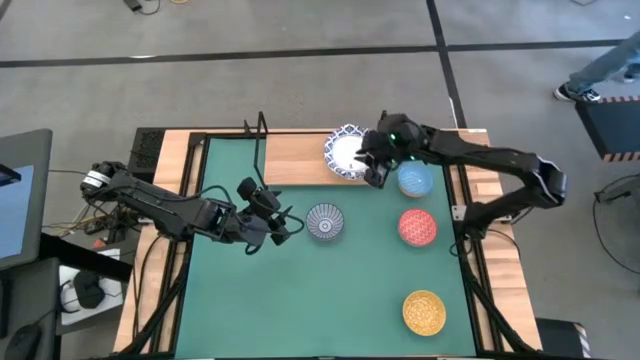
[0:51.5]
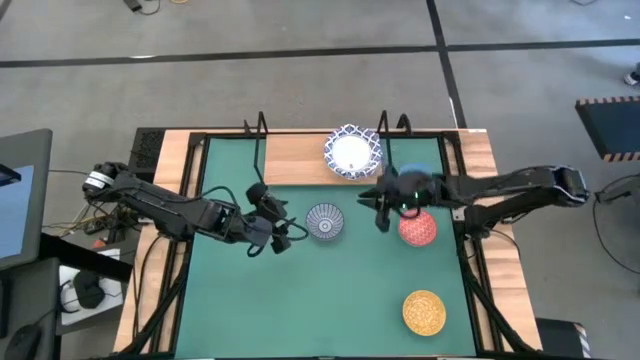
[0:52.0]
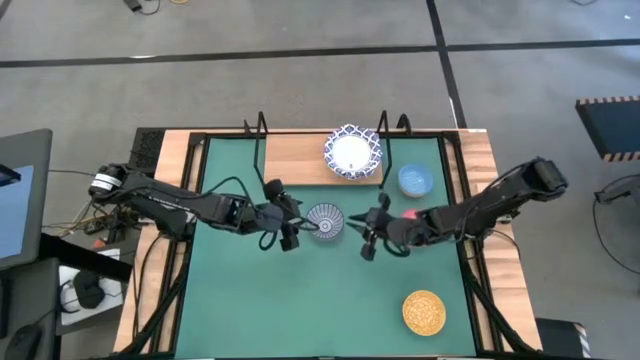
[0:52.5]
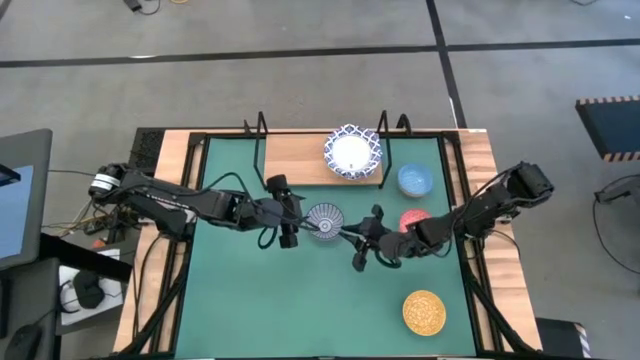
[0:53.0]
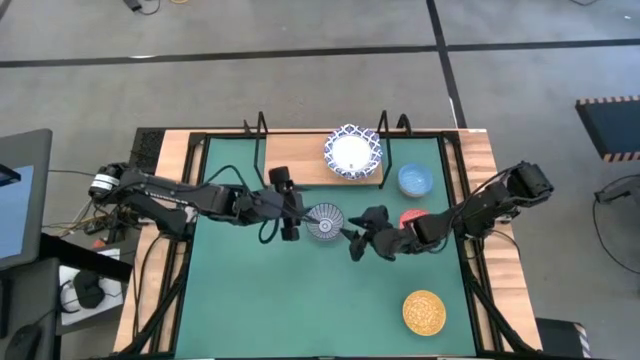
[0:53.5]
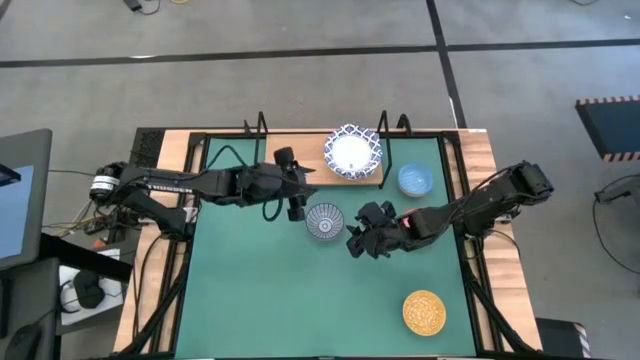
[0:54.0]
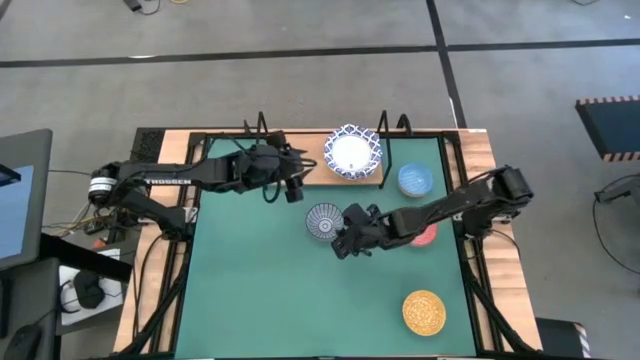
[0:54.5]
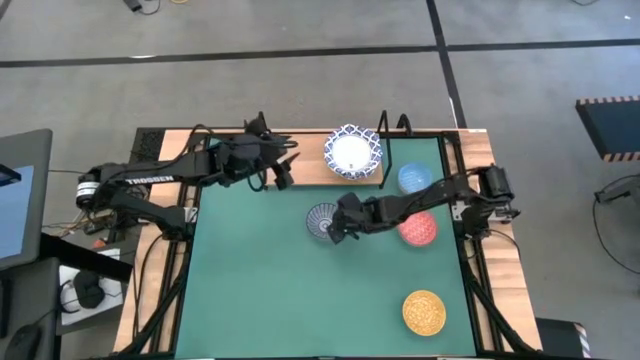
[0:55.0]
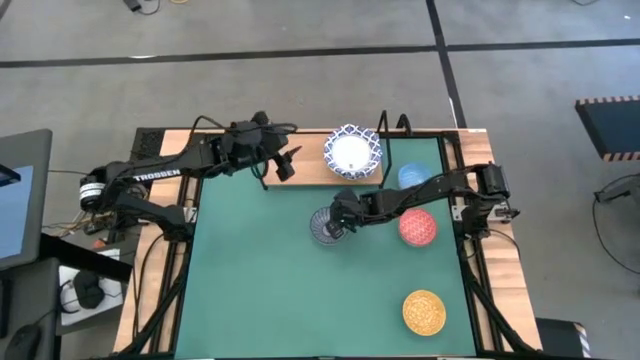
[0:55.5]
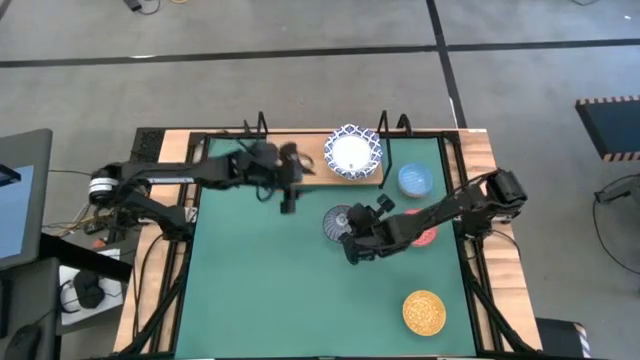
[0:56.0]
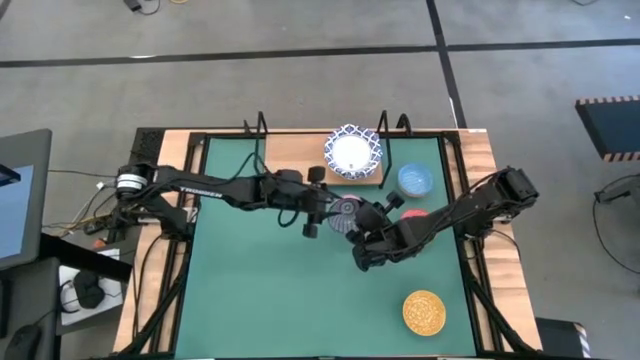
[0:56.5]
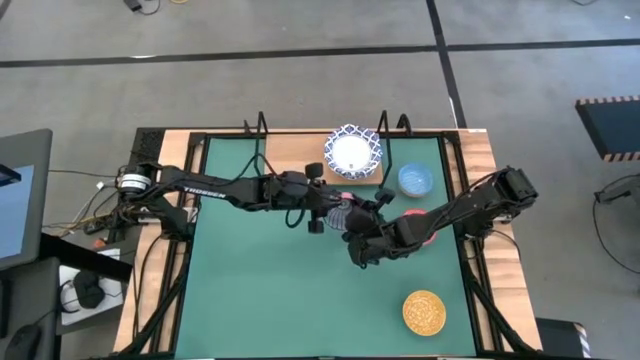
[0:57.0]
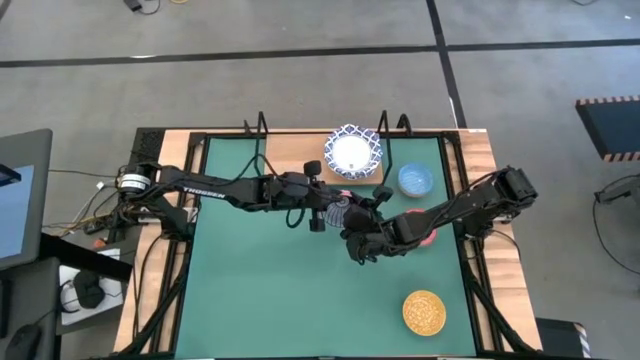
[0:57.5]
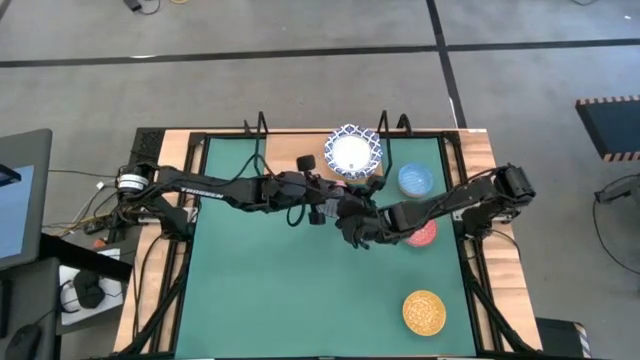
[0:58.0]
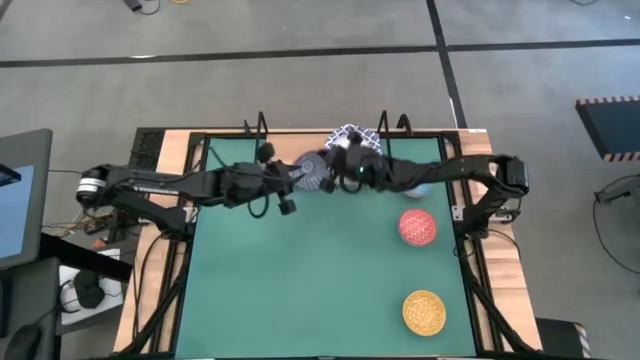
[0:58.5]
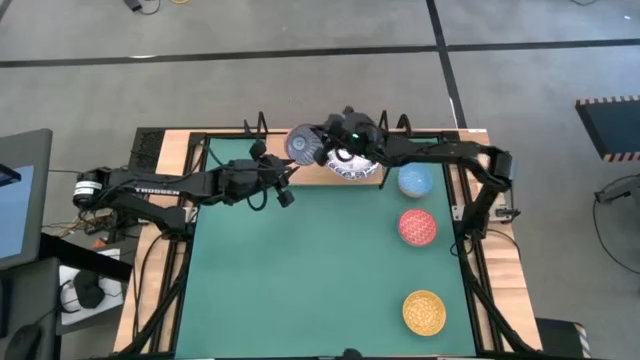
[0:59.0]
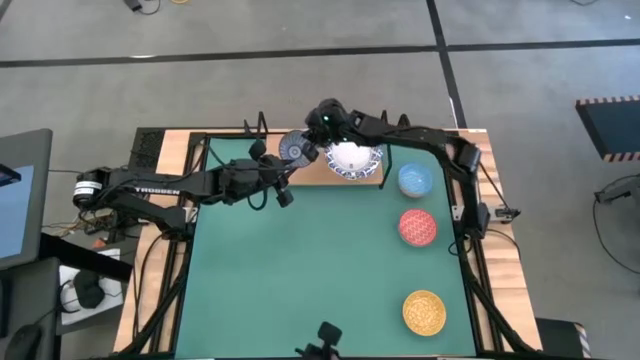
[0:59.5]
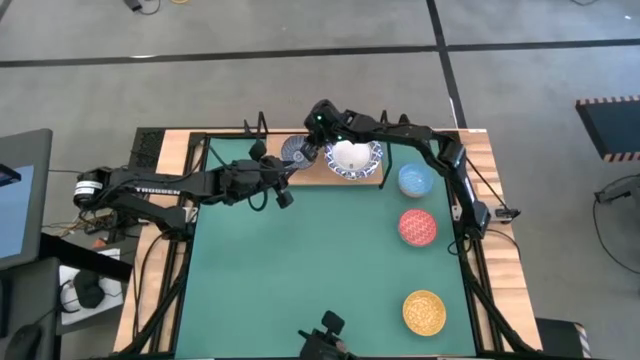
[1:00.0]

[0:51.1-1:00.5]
Task: Place and stack bowls onto a shelf
Put the blue bowl on the shelf

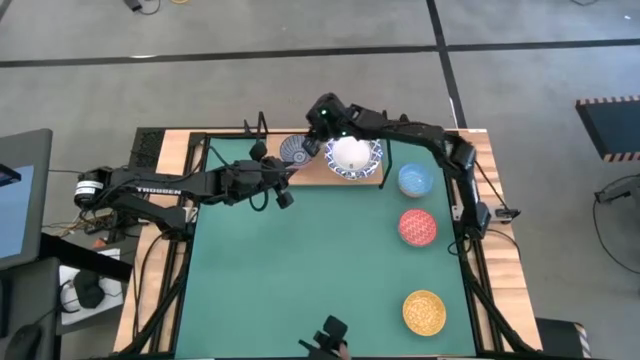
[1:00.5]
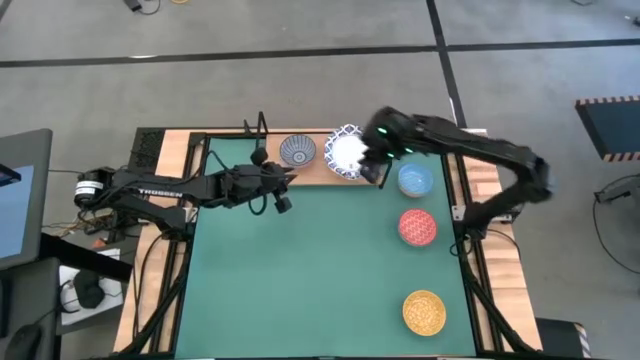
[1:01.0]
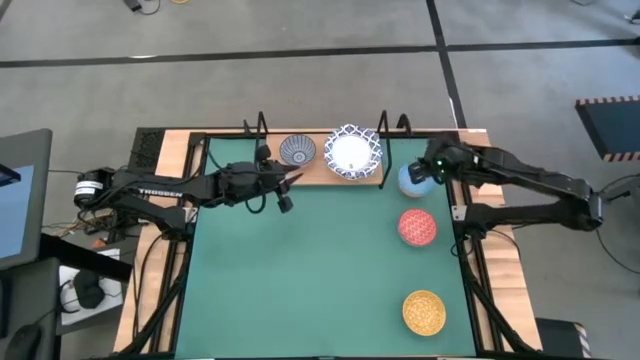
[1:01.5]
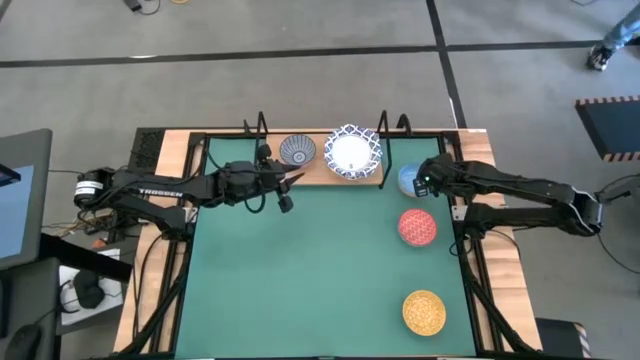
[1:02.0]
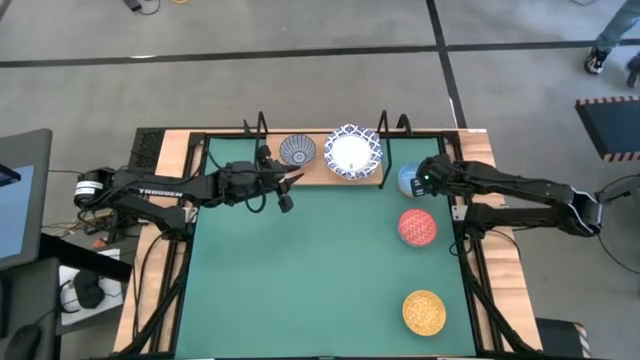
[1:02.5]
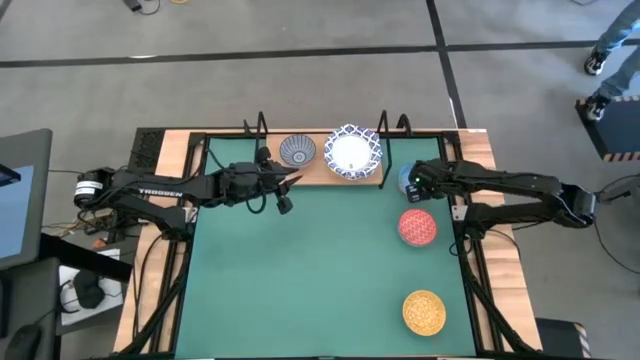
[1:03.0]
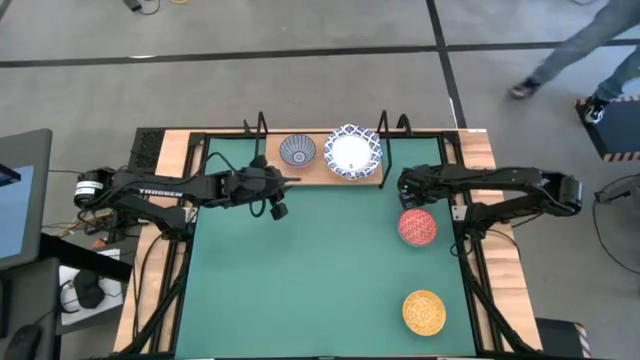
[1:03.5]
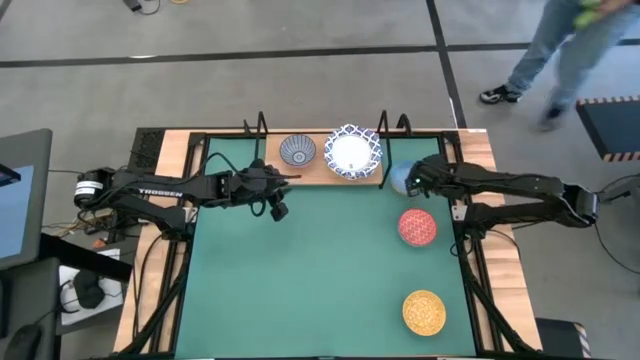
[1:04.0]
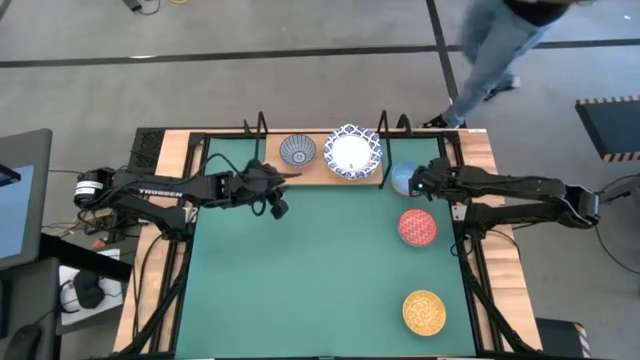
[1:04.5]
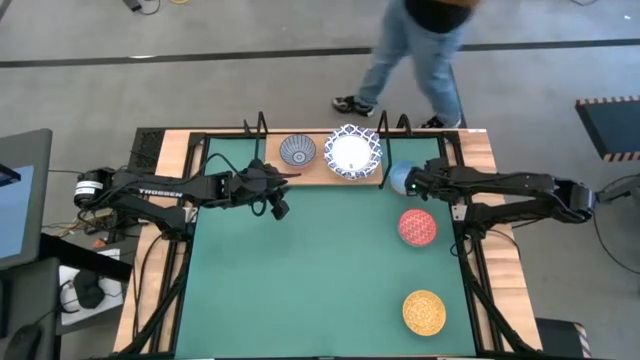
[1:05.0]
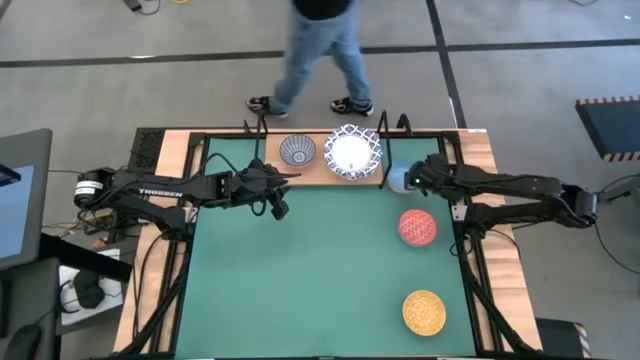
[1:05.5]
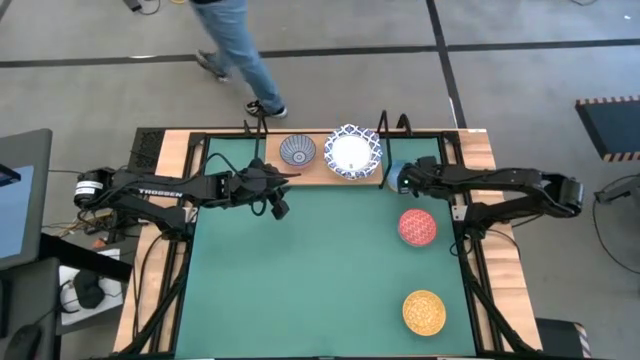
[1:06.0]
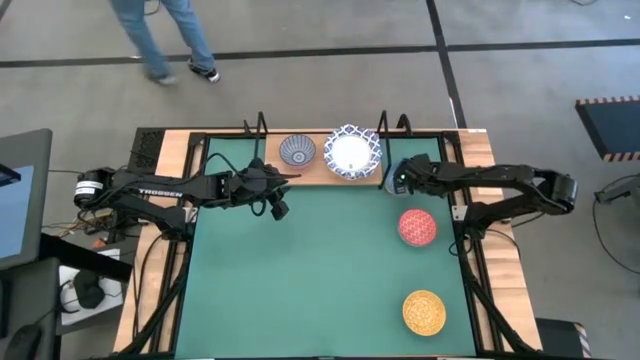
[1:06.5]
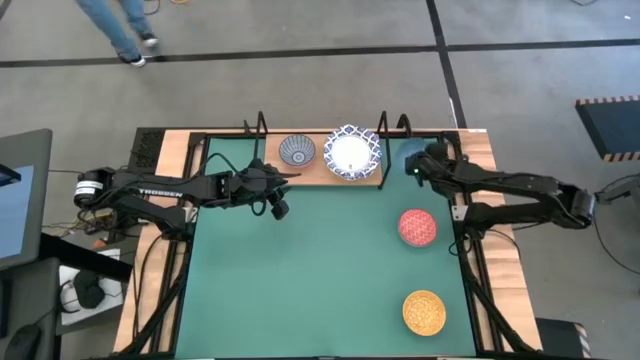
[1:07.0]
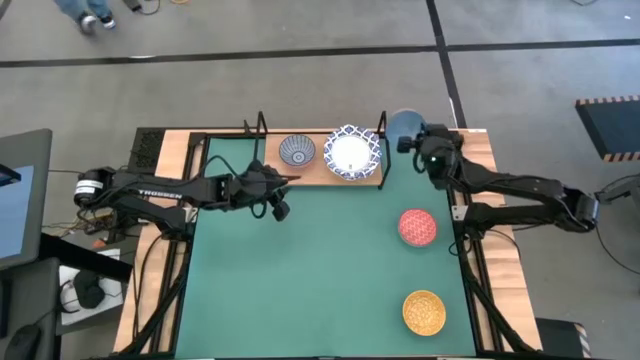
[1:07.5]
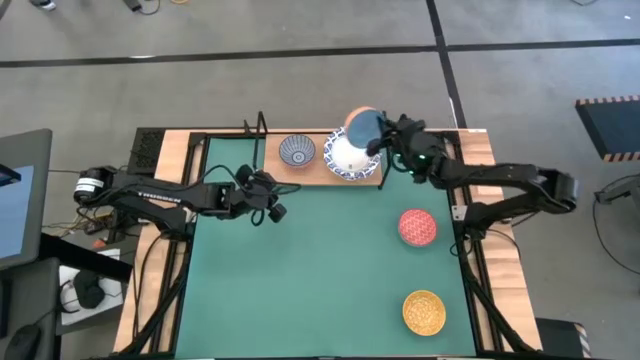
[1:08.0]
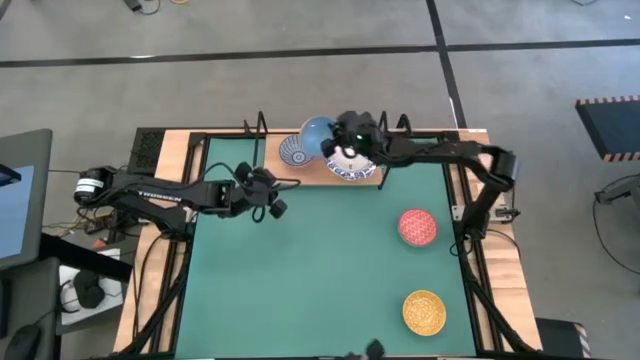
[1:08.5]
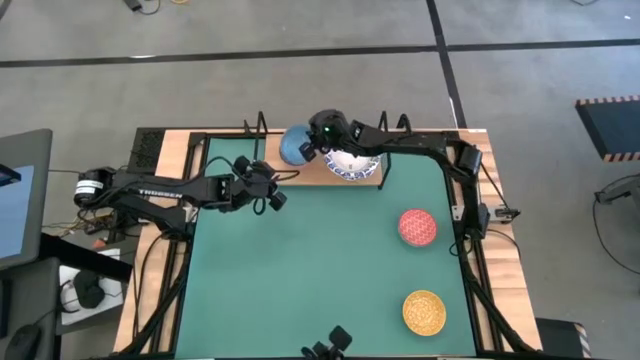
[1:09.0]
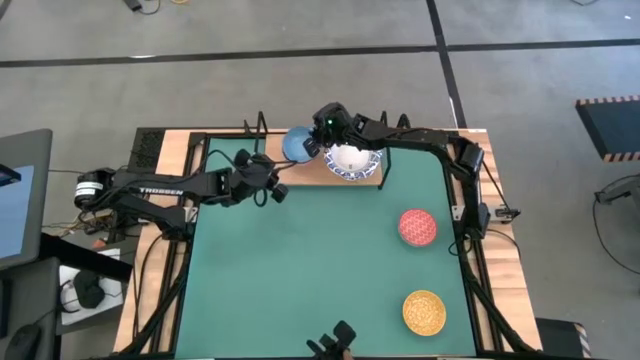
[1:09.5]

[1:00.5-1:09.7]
Stack the light blue bowl on top of the blue bowl on the shelf

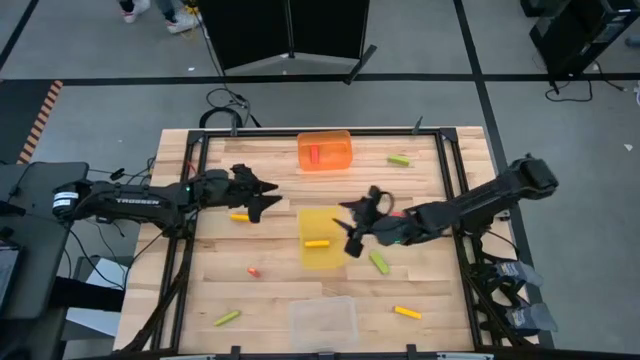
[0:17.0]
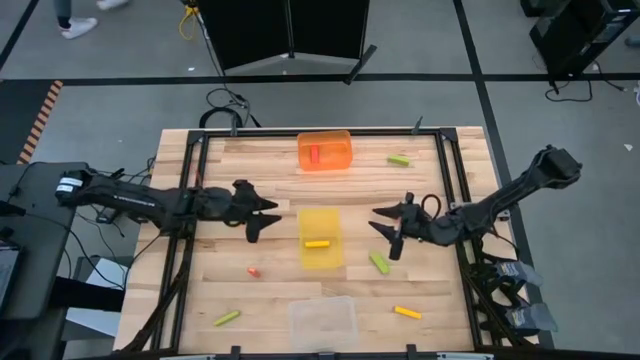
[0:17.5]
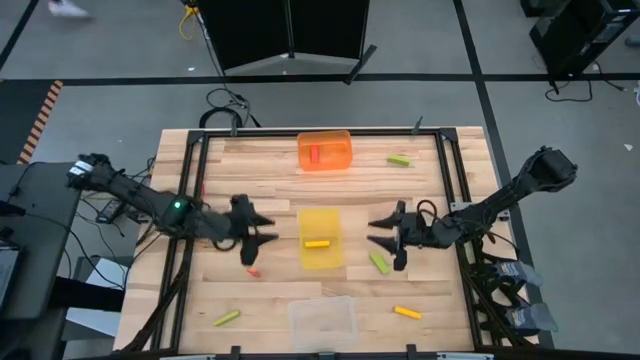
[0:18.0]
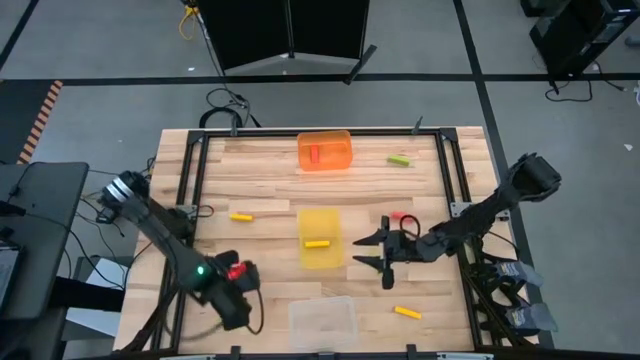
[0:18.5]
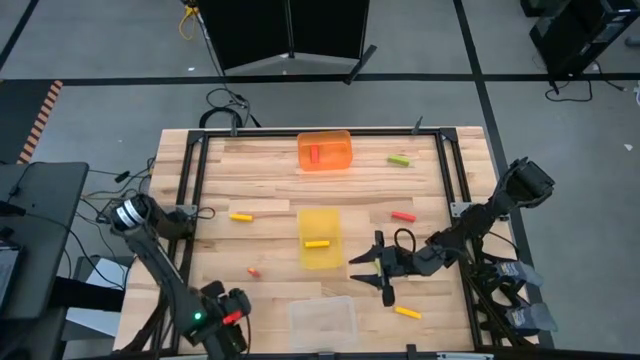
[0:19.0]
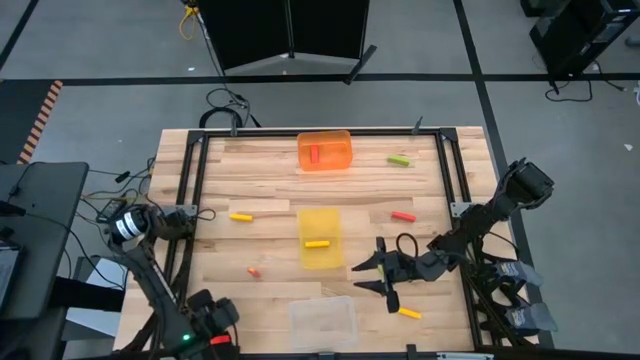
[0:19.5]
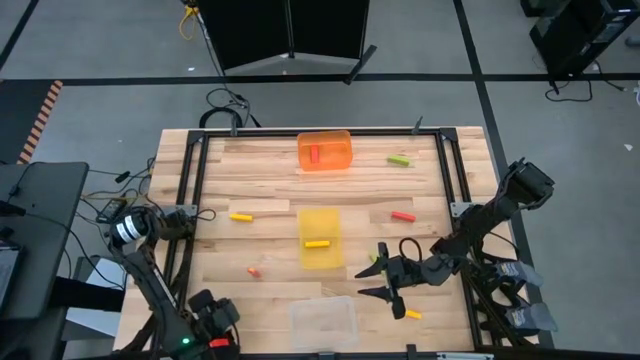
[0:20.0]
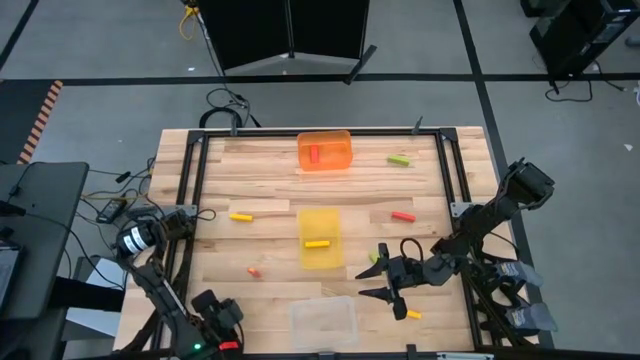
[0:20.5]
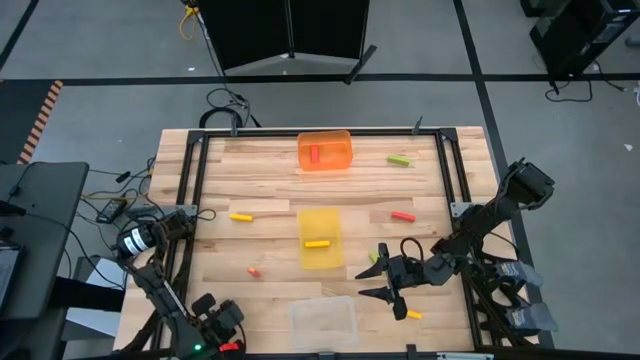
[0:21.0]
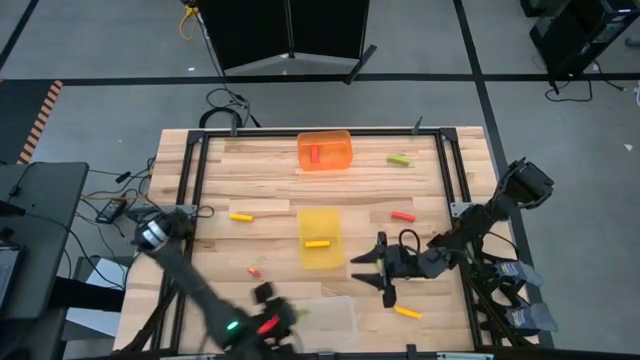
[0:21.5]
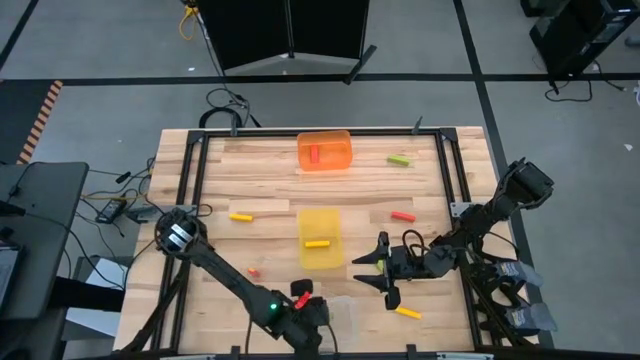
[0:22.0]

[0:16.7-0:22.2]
Task: Sort blocks
Put the bottom green block into the transparent bin
